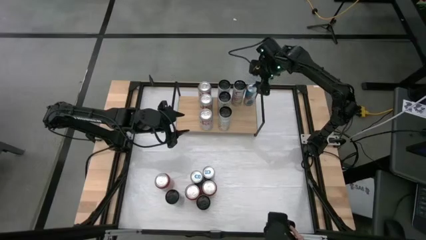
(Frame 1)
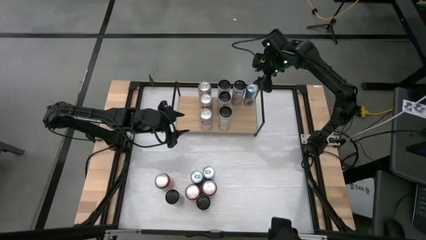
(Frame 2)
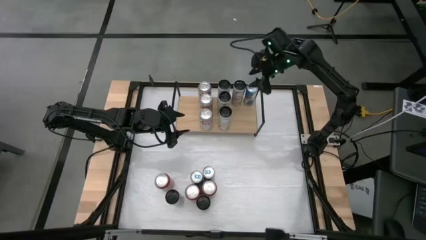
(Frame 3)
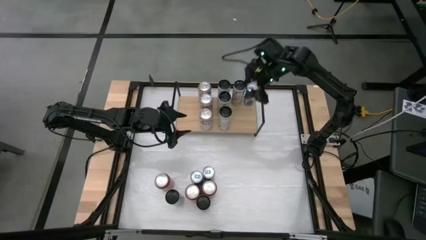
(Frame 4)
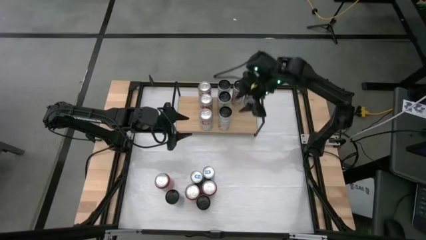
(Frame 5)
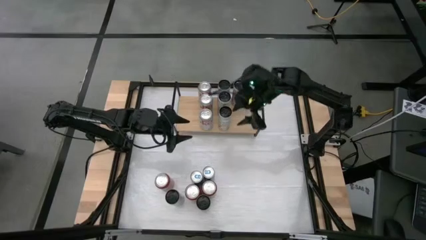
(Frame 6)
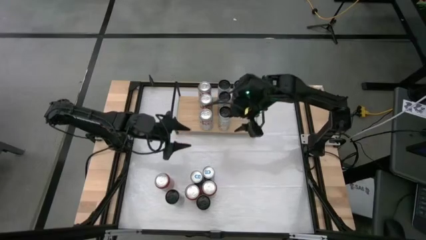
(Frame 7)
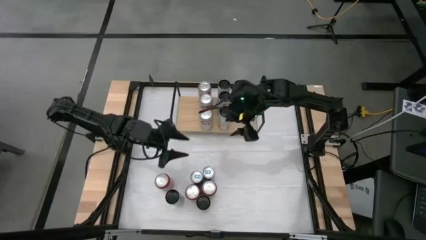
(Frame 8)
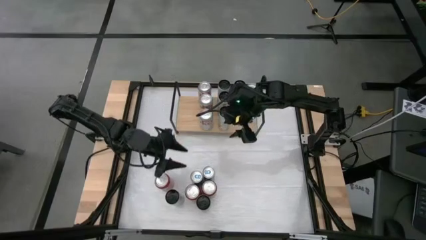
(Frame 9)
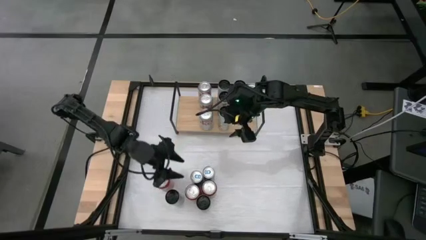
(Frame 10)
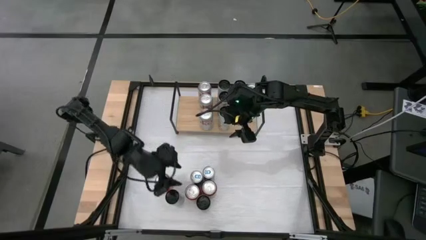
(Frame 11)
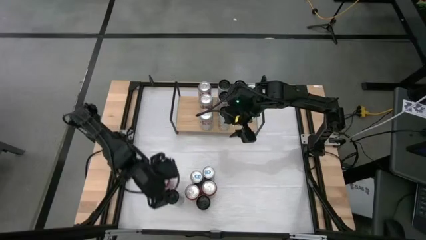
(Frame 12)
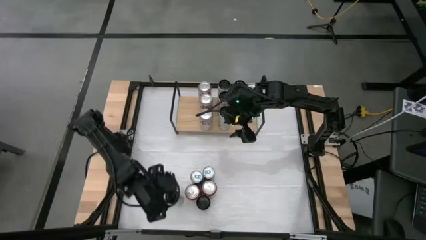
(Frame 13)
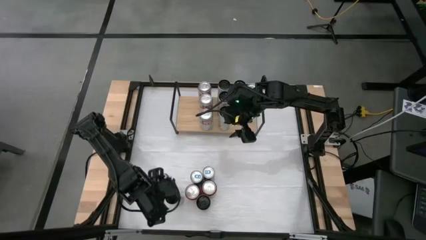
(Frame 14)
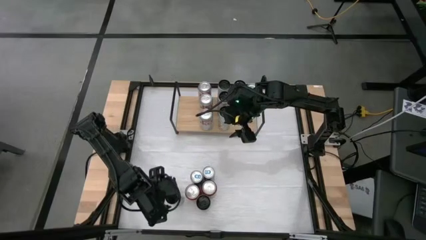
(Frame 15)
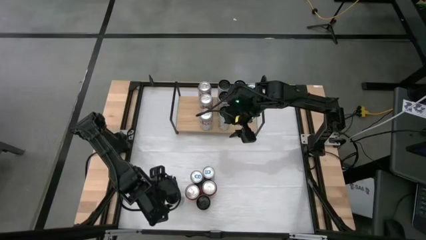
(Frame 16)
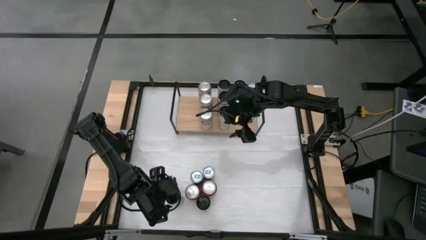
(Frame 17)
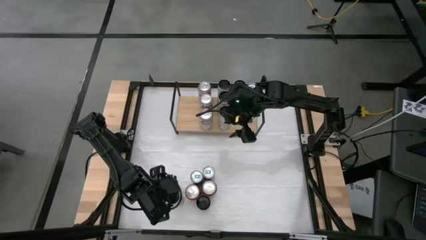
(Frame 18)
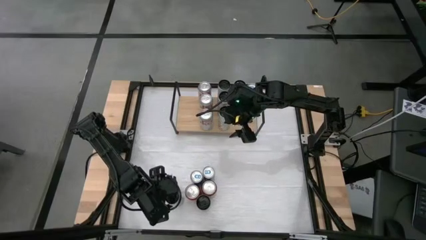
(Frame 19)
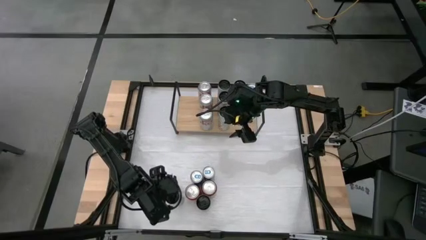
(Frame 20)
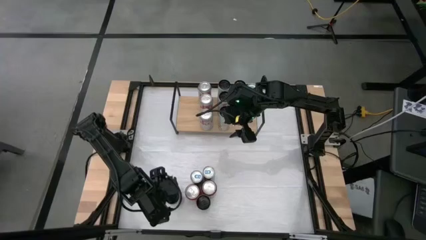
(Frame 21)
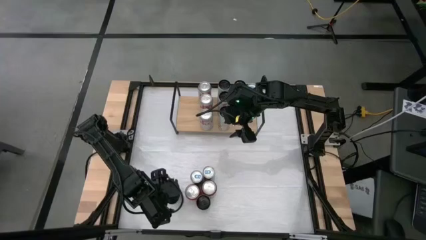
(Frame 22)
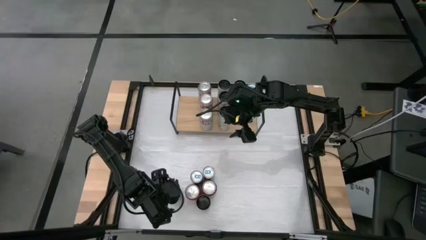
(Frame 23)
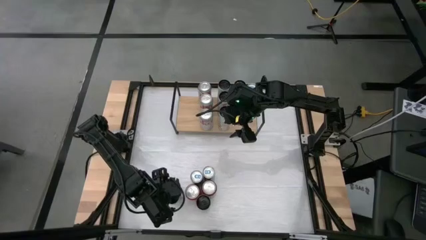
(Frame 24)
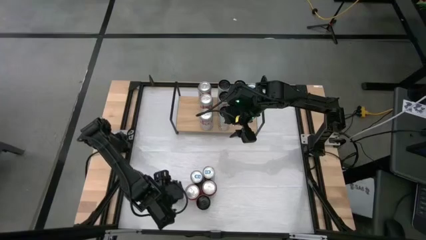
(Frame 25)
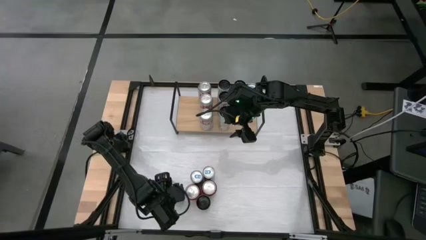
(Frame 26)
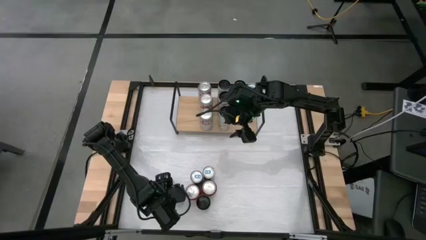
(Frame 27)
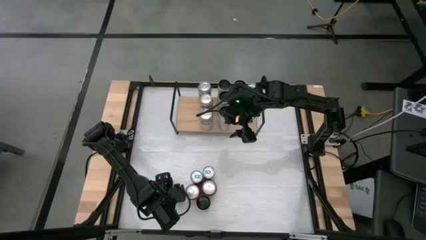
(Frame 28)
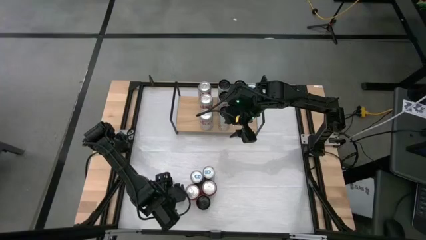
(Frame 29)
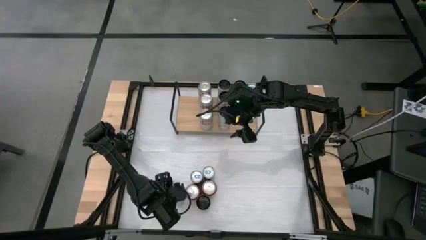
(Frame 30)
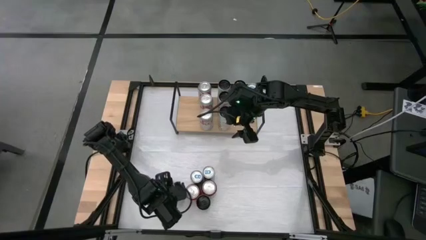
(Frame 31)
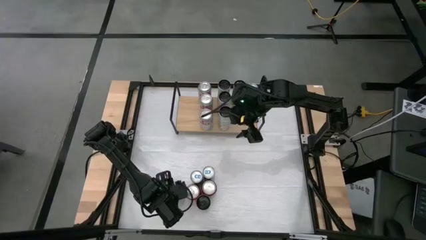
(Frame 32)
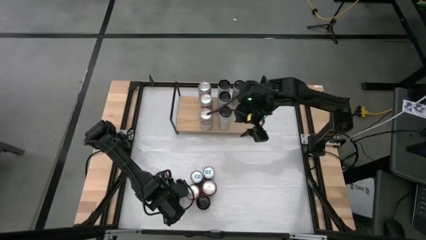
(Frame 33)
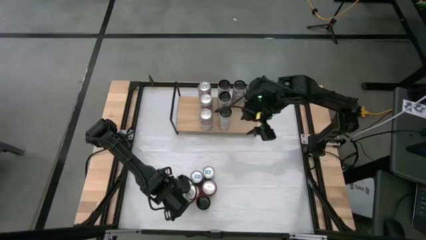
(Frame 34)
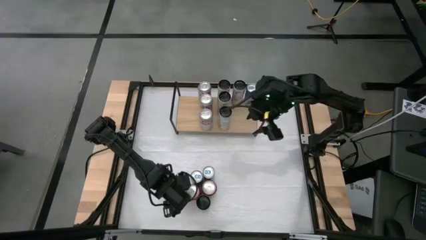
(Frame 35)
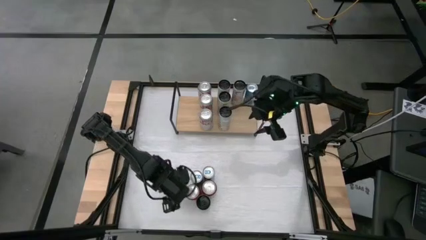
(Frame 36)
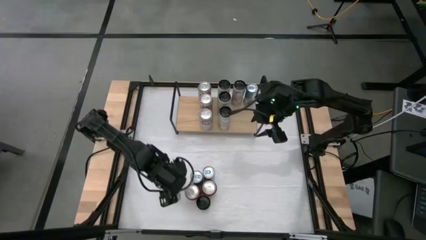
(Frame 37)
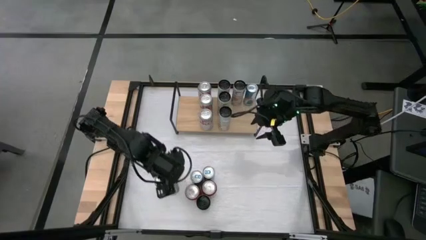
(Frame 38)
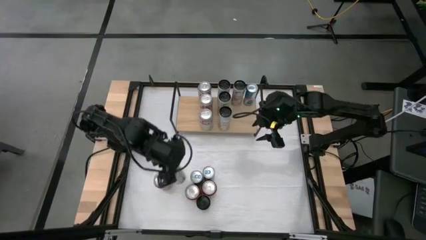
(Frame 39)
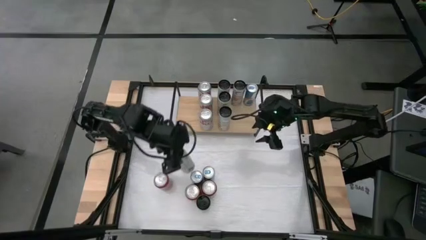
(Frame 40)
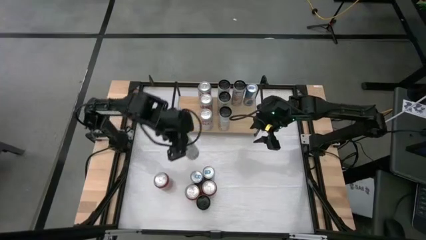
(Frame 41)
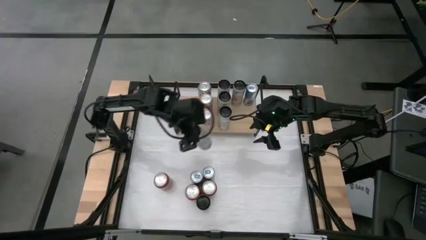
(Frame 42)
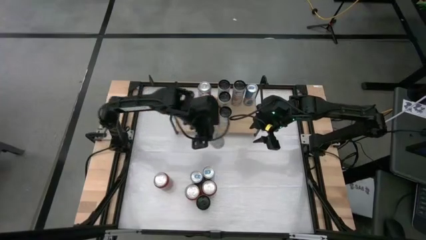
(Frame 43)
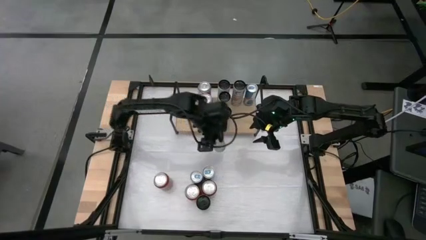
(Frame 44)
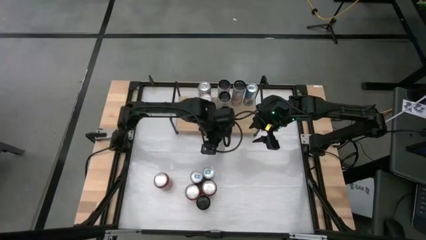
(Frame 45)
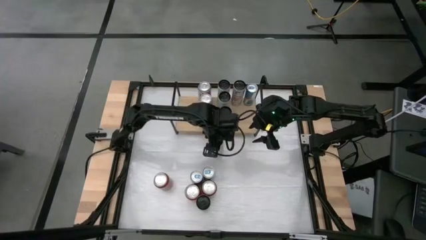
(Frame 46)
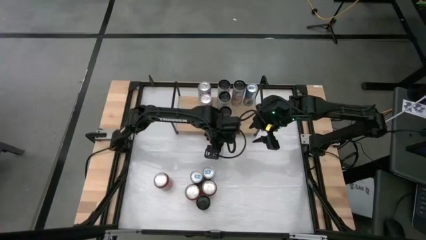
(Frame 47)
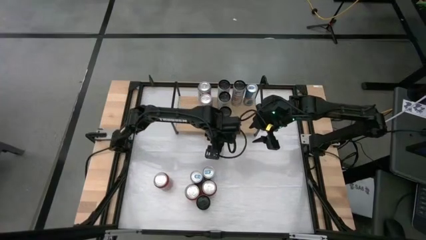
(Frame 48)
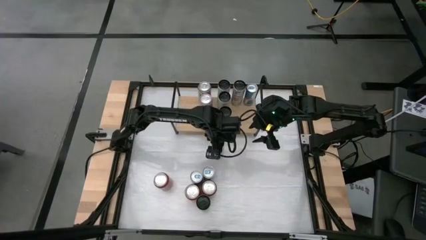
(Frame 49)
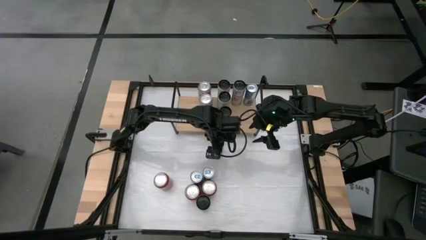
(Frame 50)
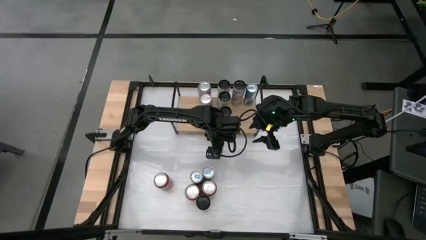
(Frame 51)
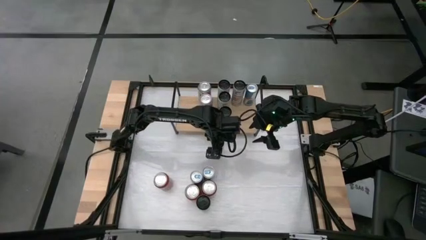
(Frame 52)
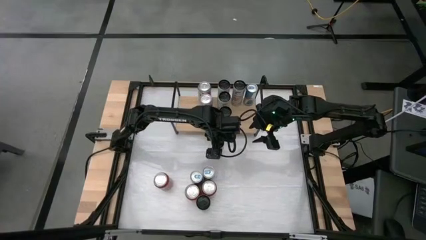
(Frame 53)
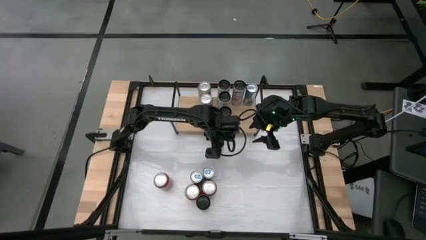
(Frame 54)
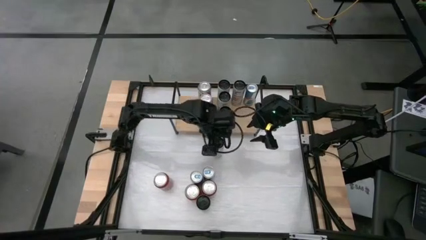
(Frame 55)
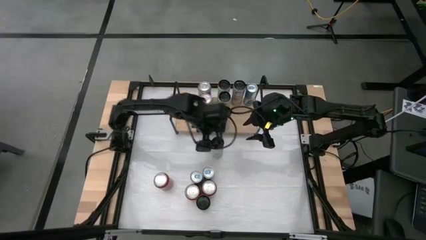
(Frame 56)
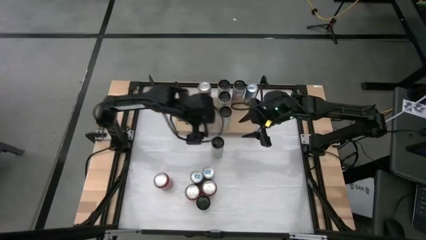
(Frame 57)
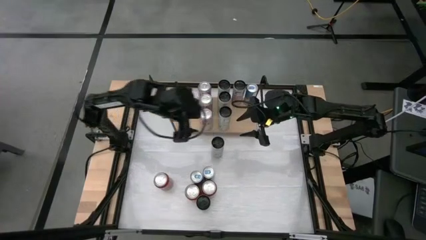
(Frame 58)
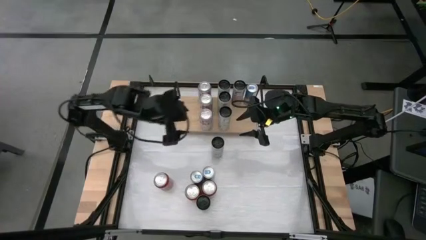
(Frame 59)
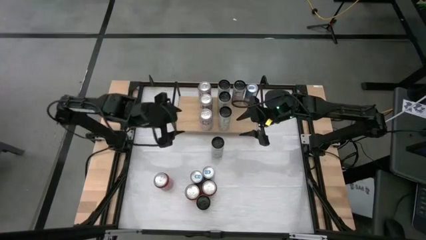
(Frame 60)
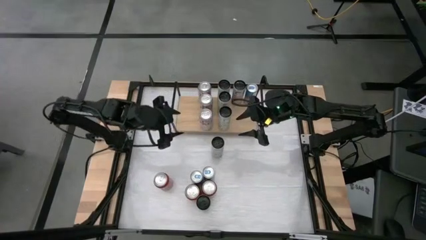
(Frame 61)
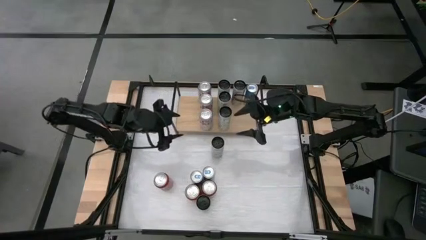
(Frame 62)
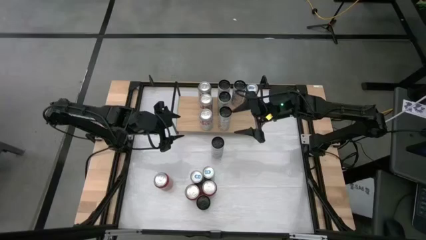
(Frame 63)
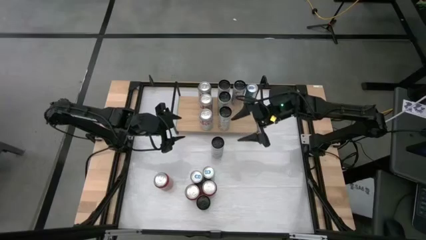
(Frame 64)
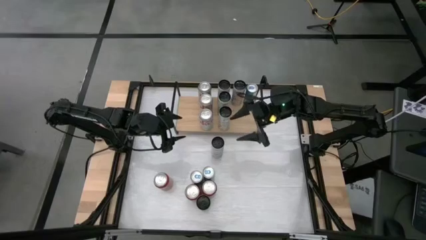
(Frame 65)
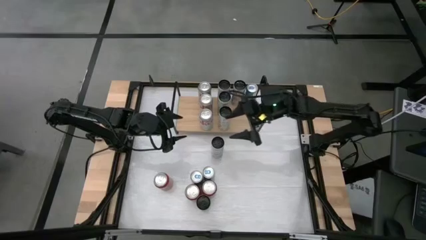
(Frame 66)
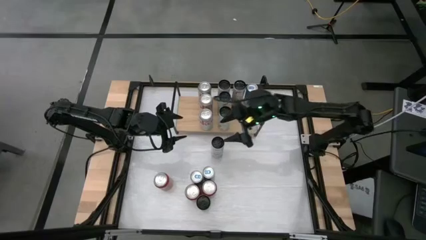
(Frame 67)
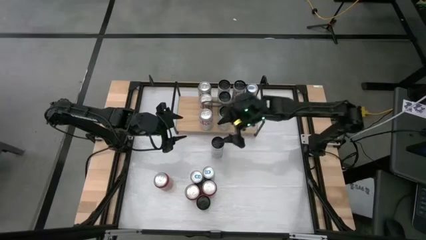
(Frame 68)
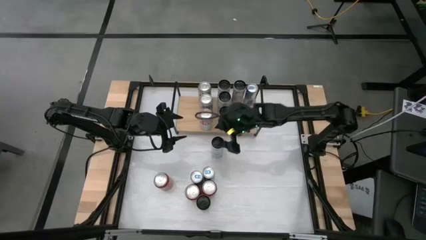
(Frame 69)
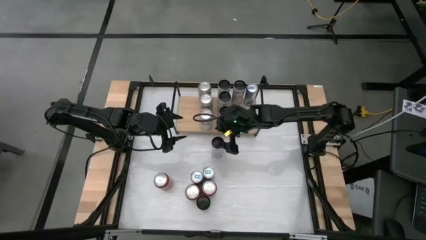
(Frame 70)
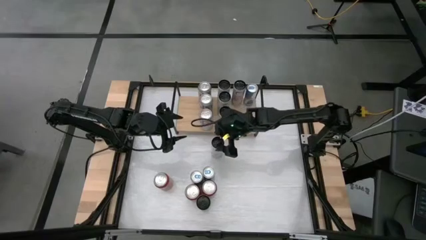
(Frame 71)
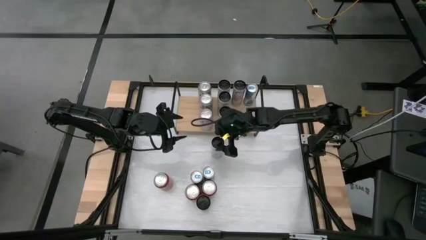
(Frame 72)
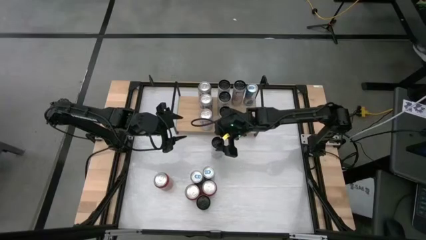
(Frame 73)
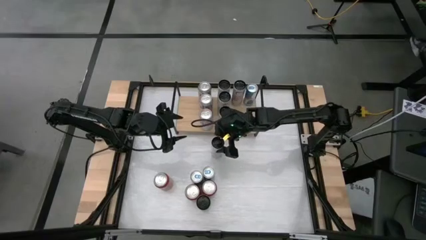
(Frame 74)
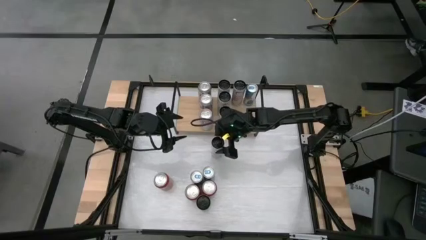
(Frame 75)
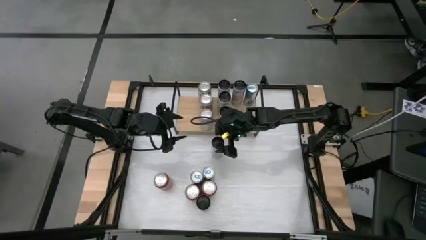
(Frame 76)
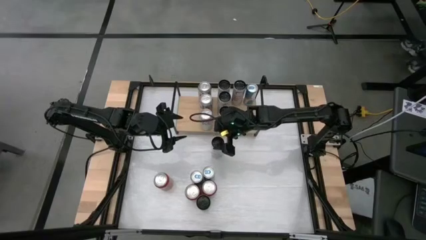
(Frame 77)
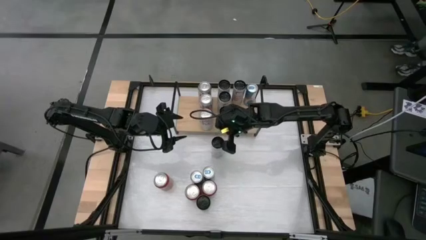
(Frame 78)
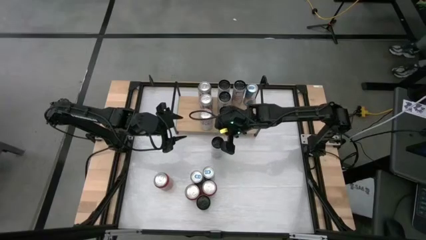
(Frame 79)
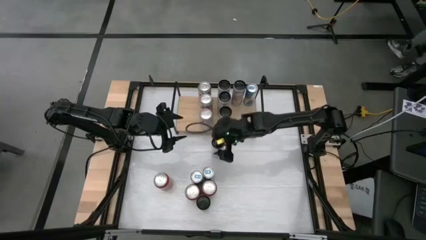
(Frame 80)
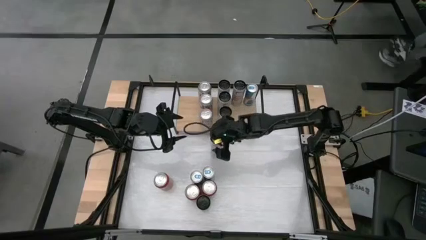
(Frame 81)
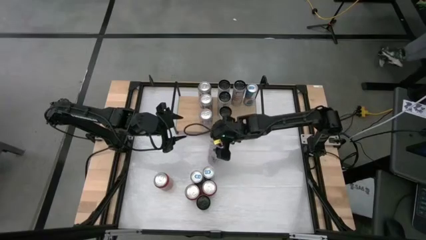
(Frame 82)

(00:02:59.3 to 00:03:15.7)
Task: Place canned beverage on shelf
Put the white pink soda can onto the shelf aligned with the other white pink soda can

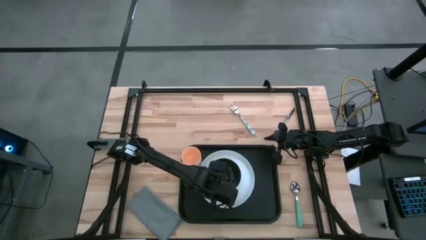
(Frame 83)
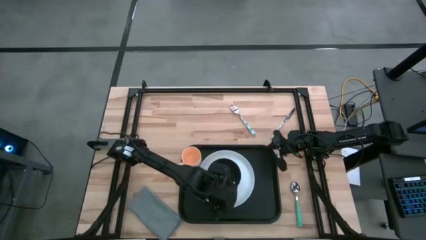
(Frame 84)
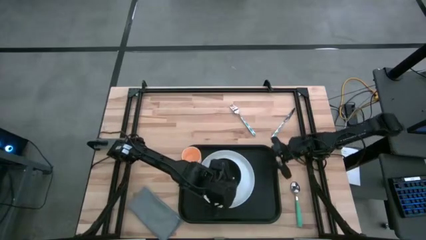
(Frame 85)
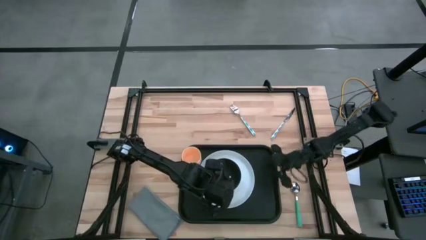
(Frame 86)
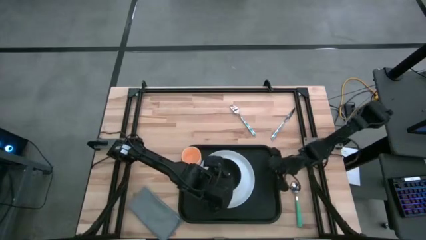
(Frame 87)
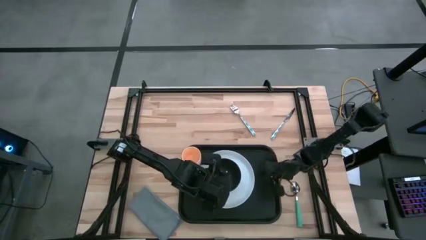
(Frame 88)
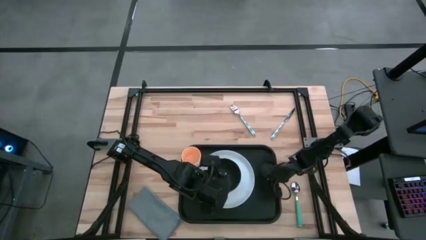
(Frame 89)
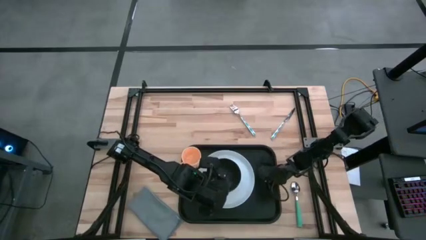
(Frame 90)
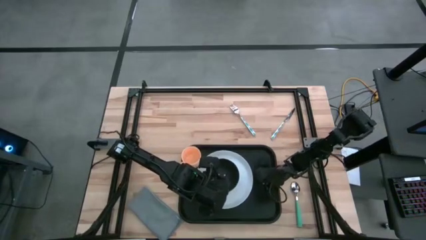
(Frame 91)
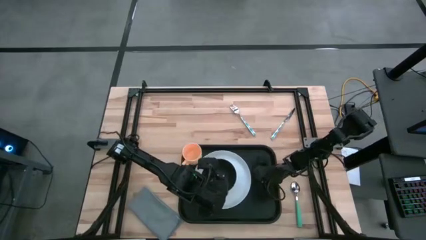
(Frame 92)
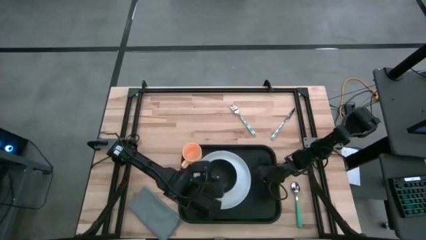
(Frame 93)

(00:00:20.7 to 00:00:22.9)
Task: Set up tray
Adjust the white plate on the black tray
